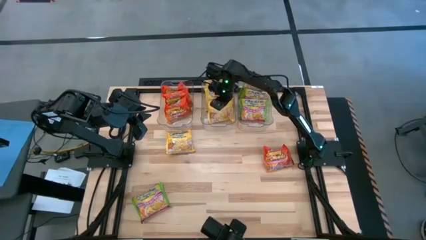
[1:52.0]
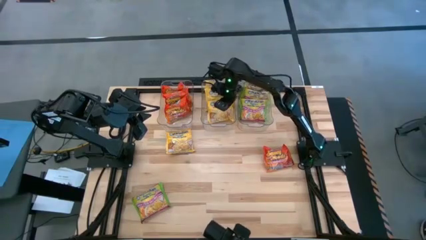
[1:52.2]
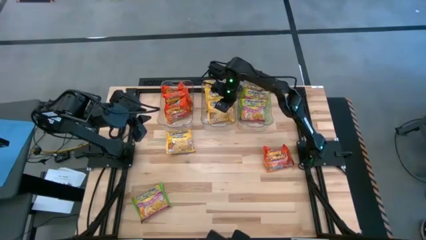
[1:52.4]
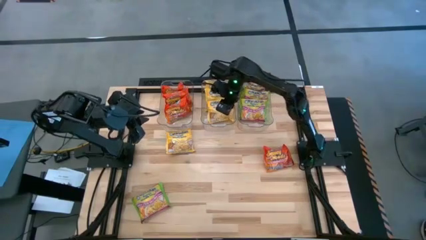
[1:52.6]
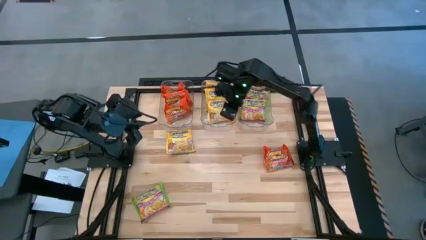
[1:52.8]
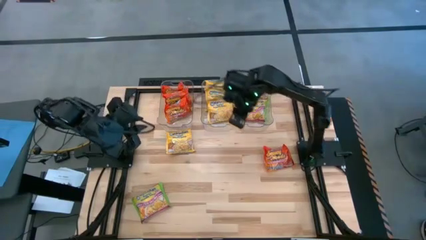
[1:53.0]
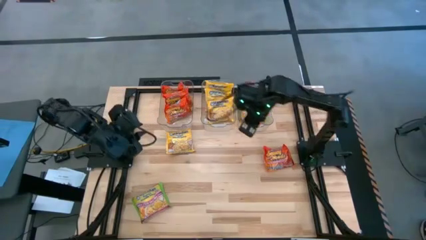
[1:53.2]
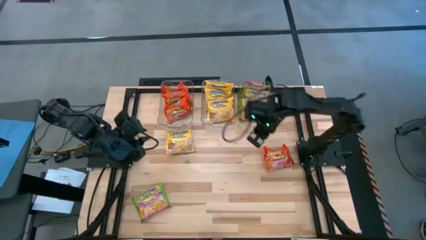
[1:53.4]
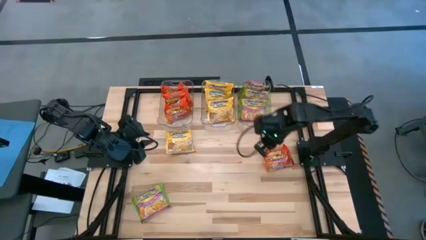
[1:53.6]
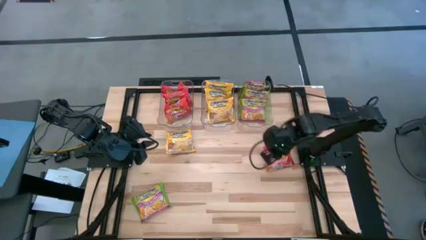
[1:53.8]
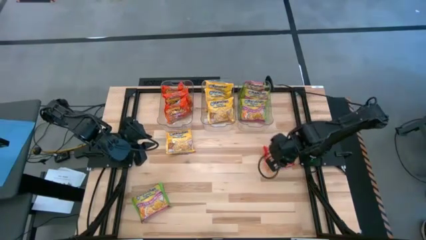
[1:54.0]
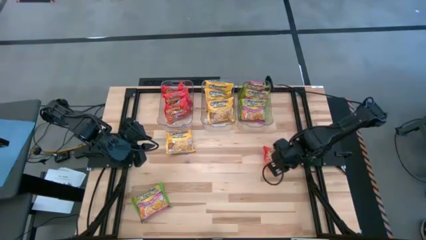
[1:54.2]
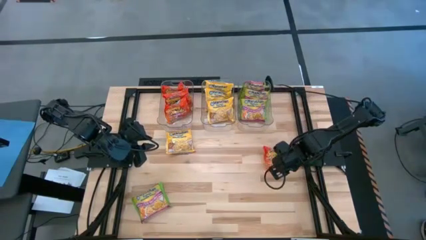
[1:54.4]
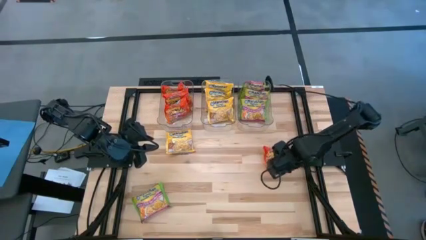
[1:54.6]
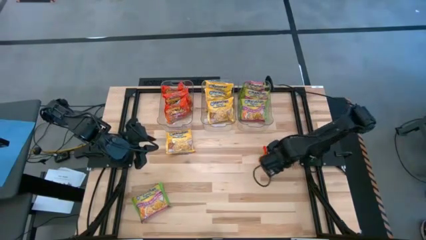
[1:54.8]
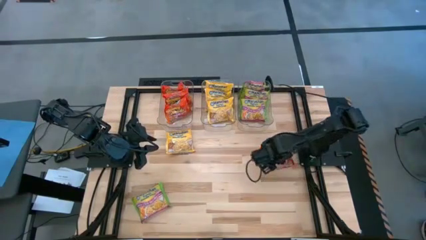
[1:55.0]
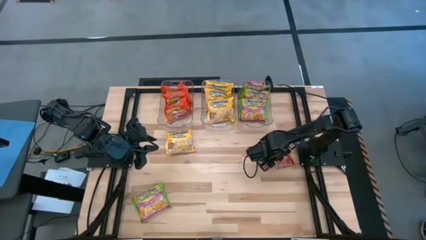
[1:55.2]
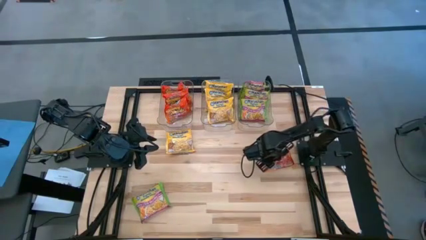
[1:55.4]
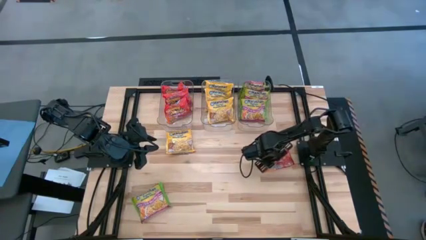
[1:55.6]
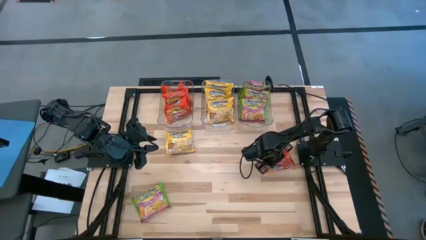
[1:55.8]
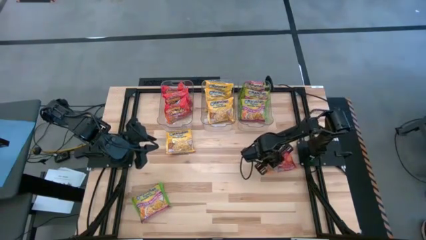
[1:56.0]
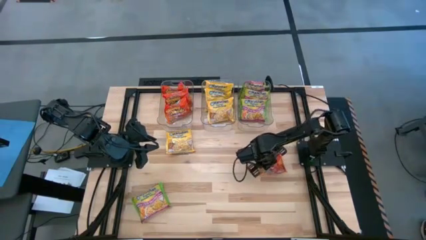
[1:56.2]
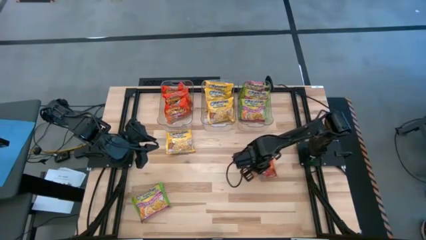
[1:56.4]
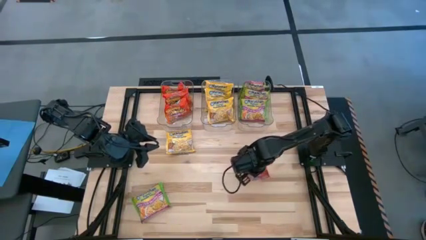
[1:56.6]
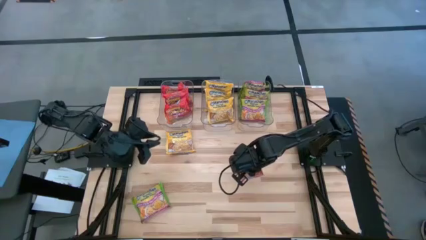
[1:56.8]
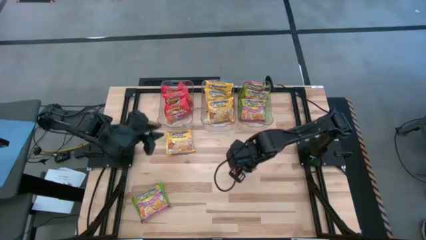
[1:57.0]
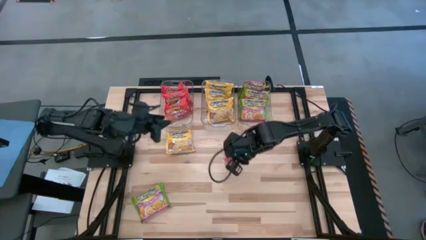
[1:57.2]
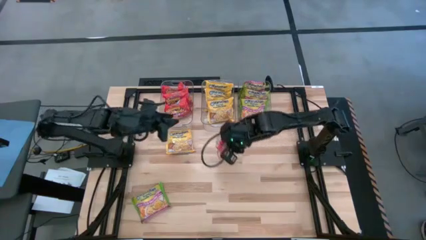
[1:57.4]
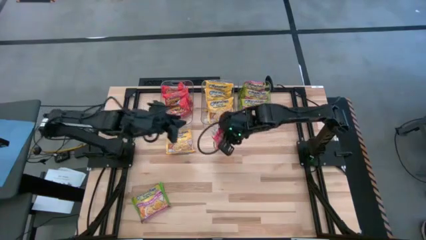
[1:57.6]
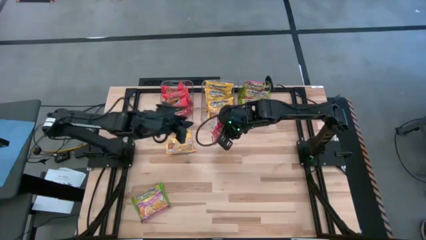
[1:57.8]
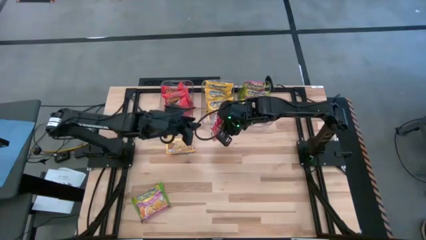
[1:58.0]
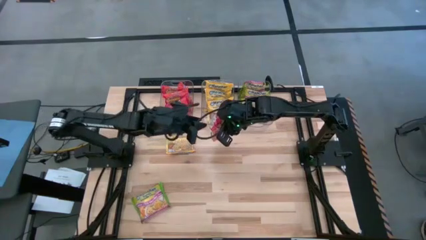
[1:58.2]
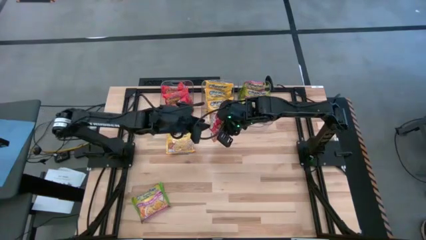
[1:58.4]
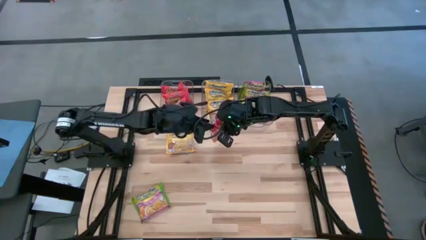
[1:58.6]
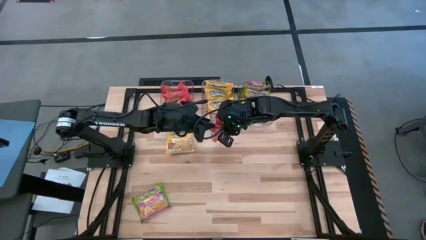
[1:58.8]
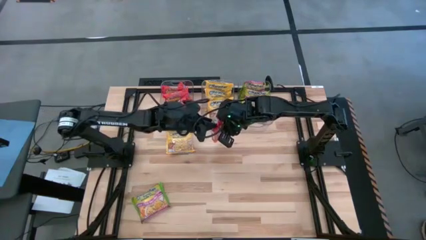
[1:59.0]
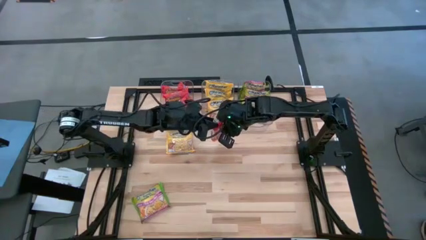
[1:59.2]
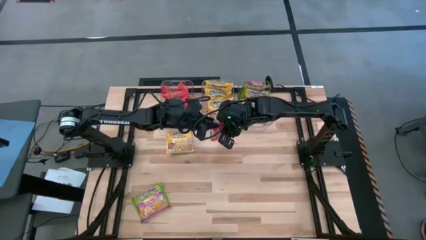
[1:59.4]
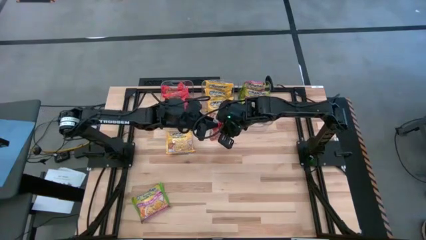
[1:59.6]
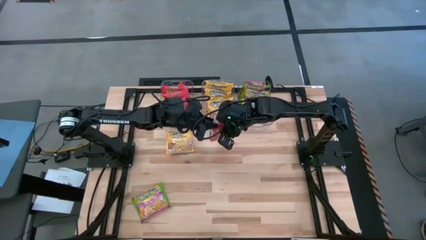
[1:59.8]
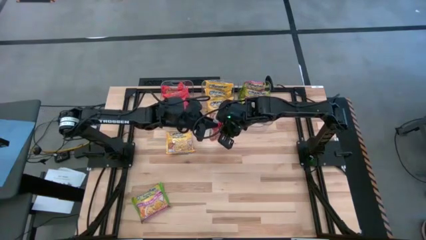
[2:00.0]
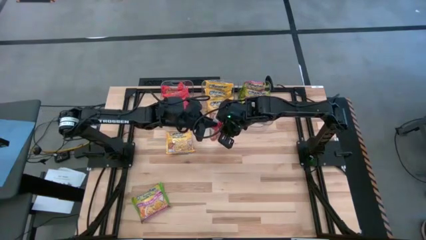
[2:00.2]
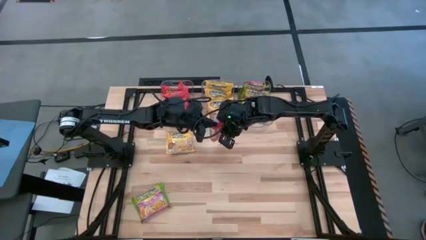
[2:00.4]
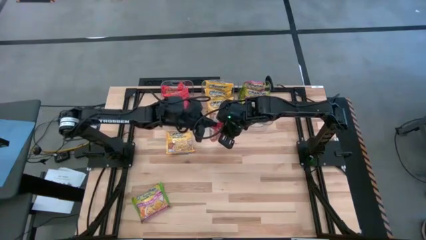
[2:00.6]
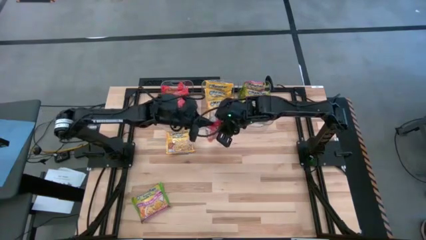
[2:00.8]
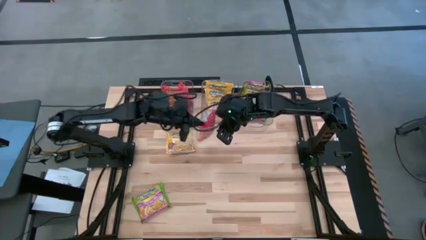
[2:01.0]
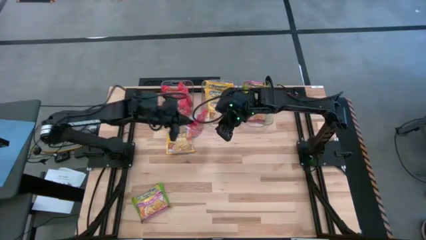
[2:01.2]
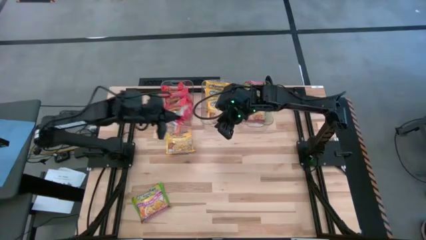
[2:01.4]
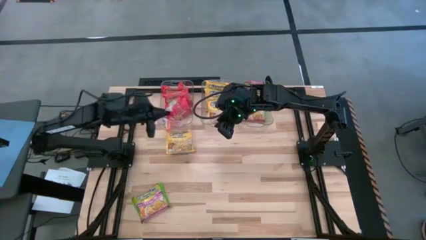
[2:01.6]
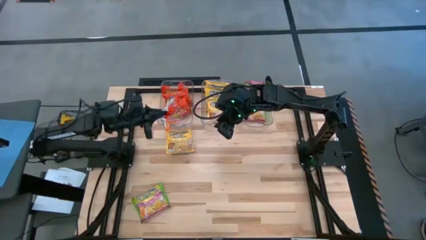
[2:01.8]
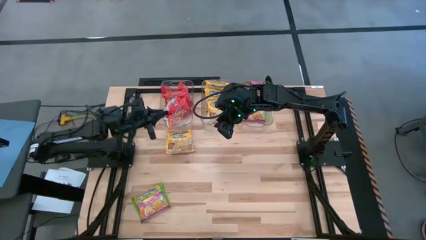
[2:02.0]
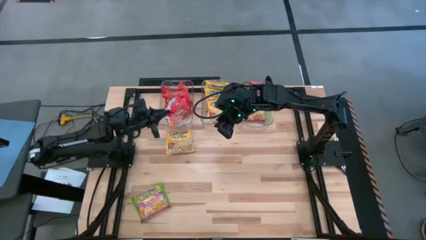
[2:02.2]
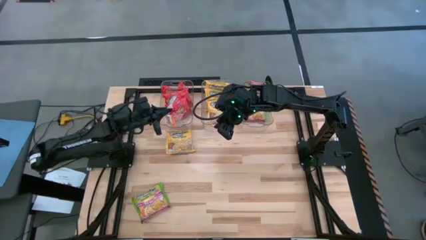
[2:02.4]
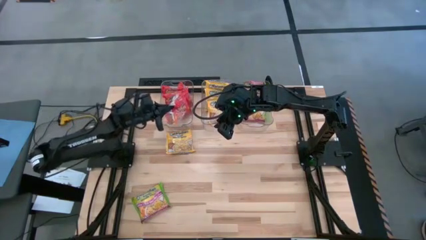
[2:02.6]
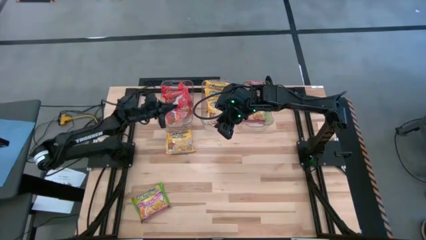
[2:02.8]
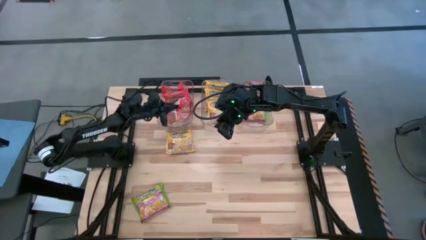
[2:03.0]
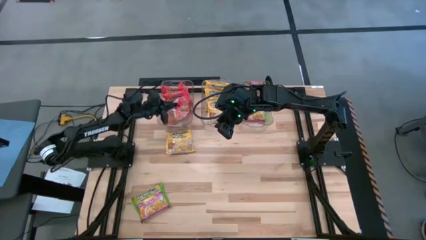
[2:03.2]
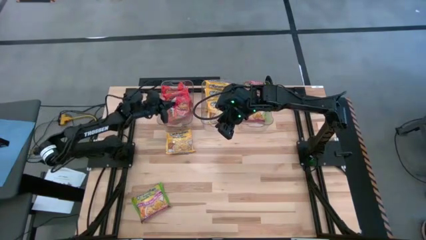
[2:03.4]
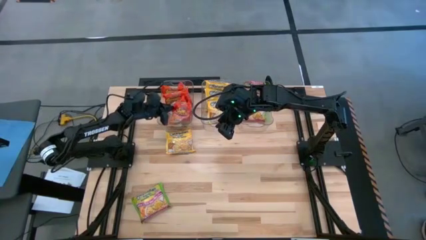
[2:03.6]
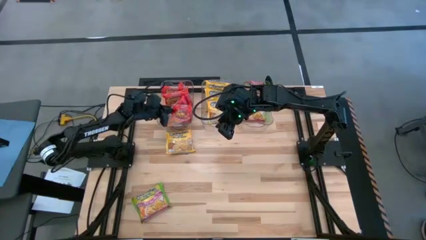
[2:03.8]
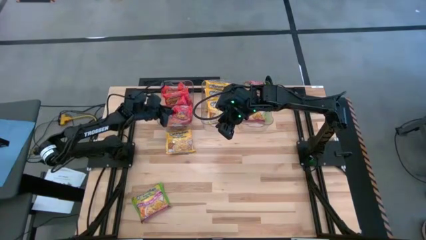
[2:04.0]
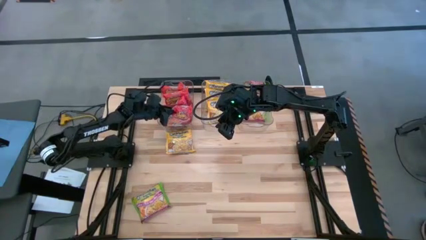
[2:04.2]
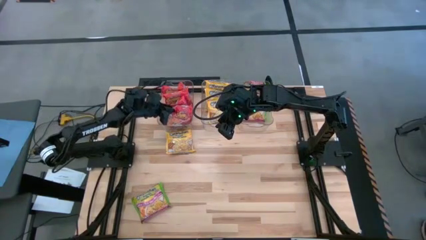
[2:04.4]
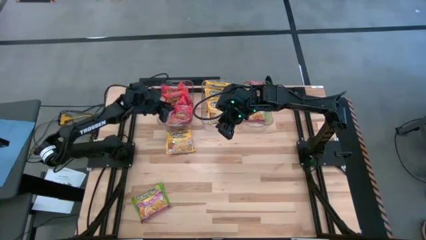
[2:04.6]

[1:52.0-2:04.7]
Task: Sort Maruchan noodles
Put the orange noodle pack into the left transparent bin

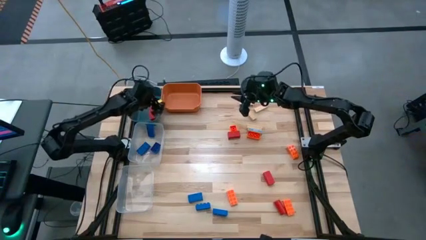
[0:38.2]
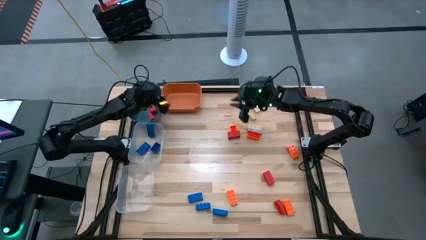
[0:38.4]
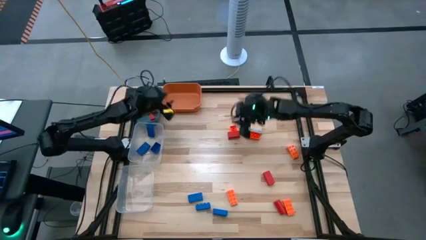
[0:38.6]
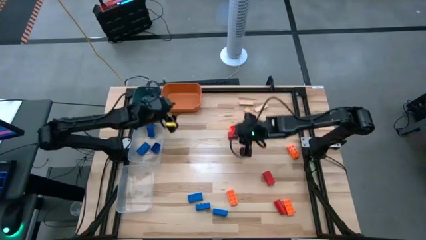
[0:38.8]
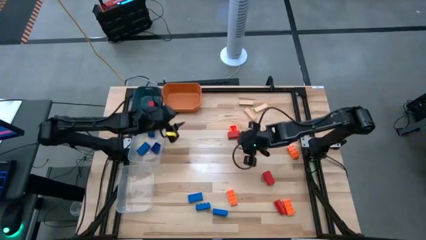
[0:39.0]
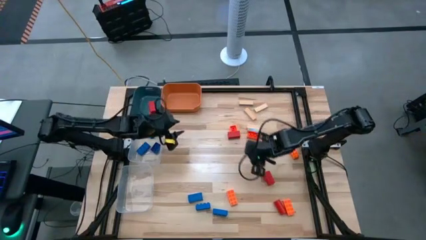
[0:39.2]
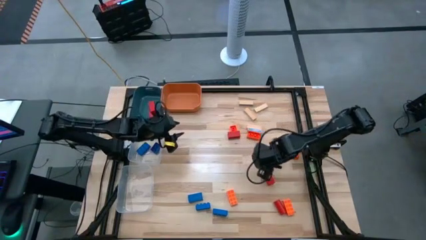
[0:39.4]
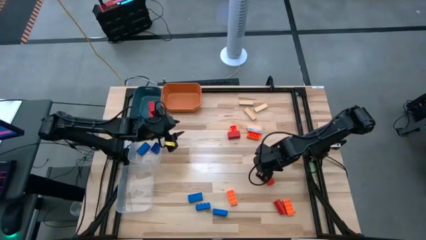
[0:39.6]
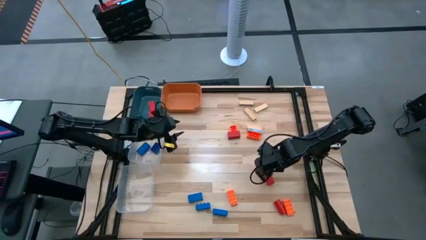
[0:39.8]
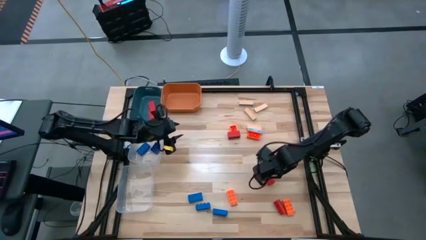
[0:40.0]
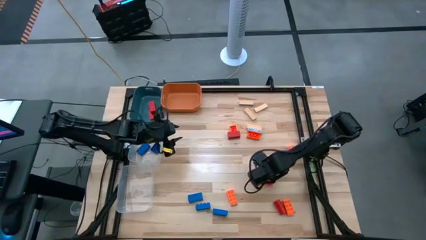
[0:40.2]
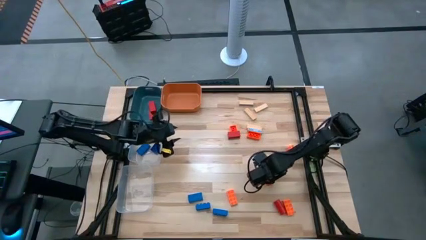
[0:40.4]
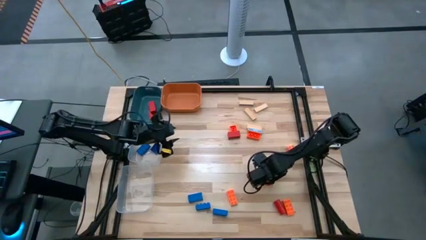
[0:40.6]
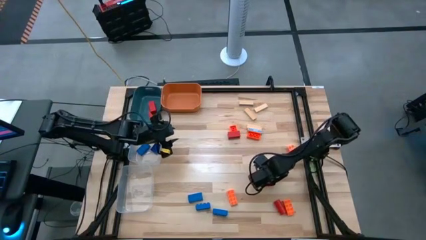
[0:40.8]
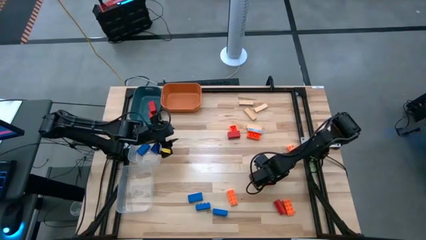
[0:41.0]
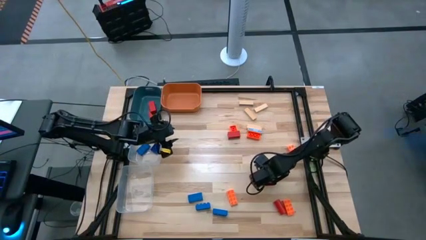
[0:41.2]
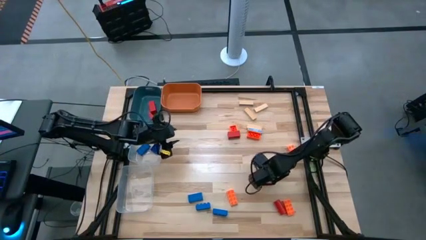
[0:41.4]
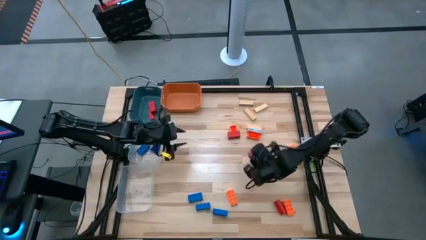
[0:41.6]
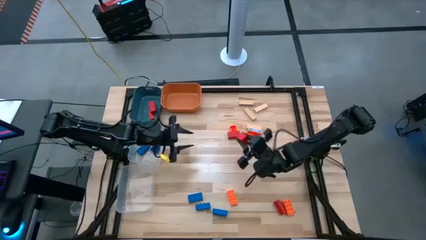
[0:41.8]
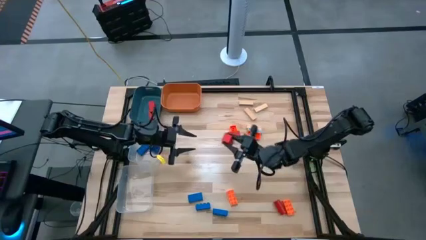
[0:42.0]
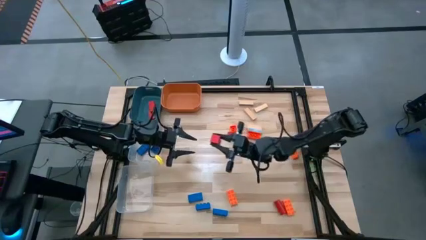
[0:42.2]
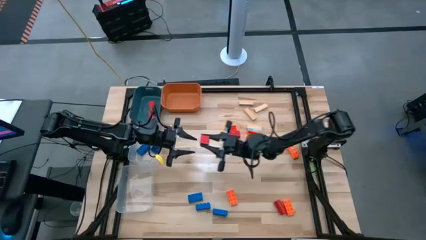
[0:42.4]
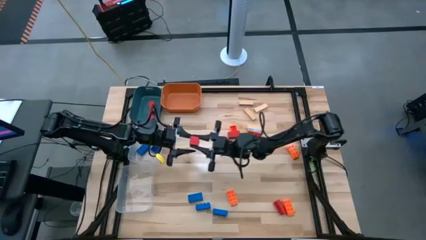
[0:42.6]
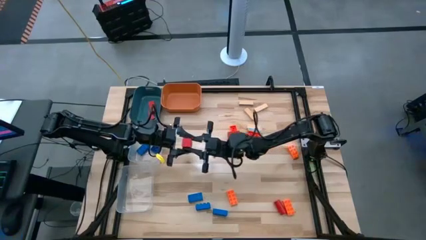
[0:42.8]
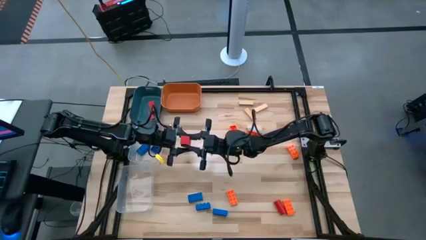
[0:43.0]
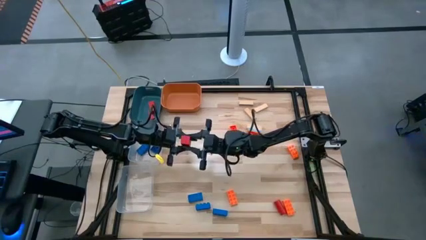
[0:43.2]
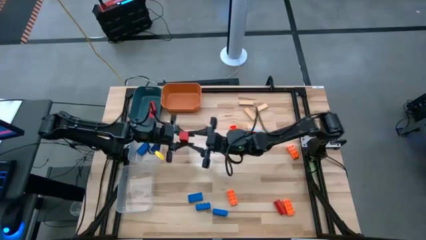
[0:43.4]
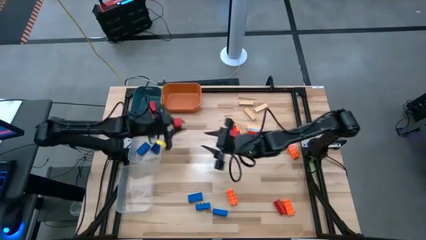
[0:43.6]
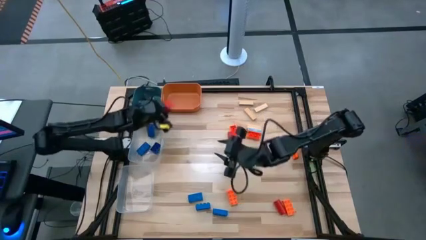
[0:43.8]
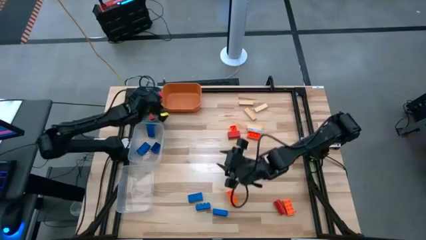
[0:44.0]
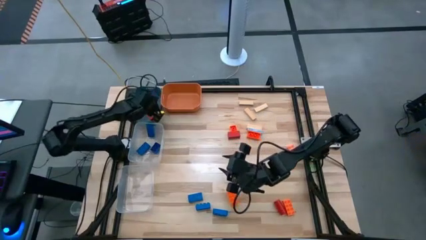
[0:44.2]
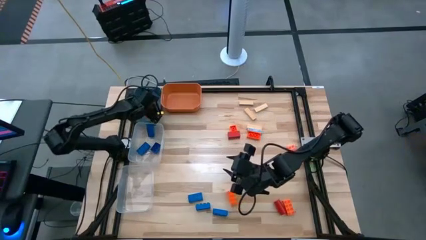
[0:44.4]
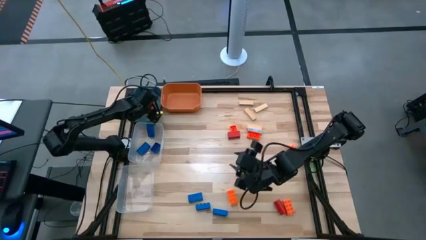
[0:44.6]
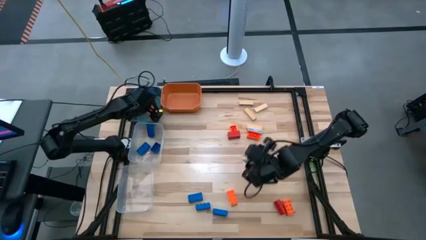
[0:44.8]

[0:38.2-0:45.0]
Task: Sort blocks
Put the wooden red block into the blue bin
